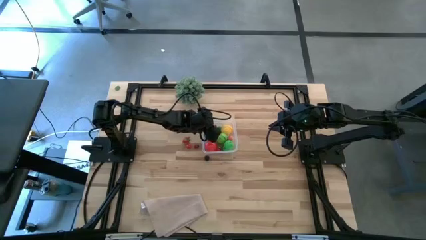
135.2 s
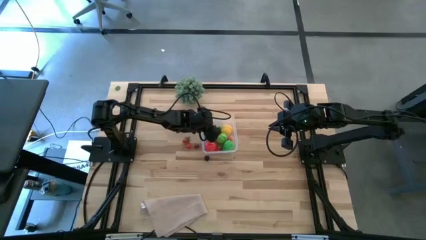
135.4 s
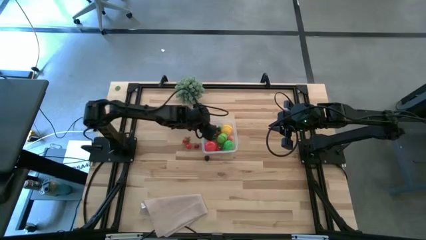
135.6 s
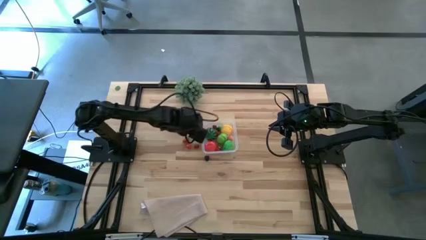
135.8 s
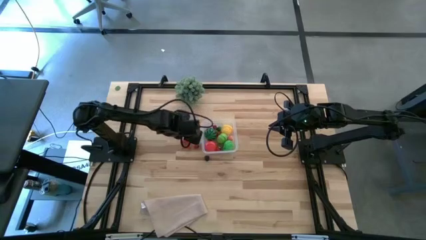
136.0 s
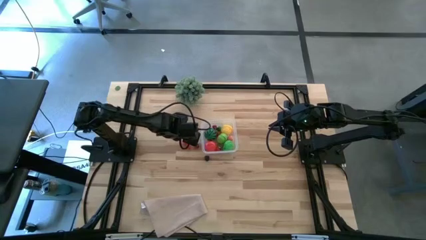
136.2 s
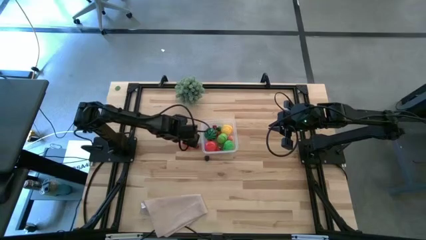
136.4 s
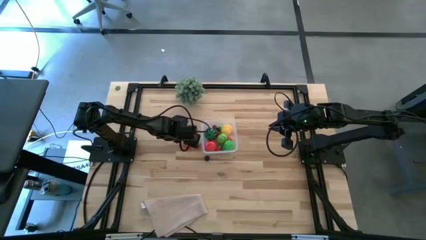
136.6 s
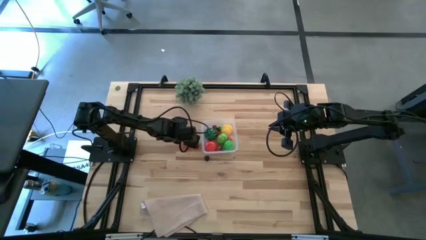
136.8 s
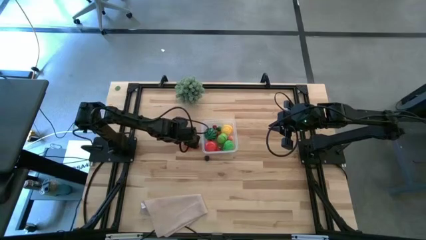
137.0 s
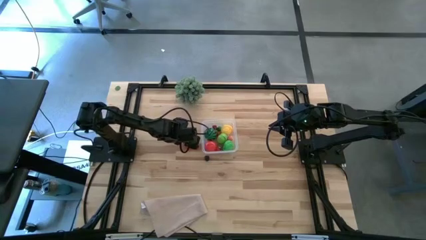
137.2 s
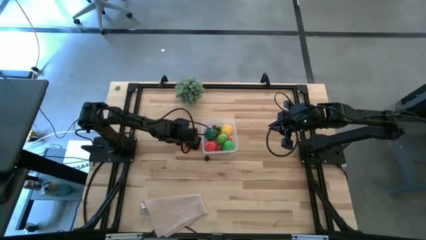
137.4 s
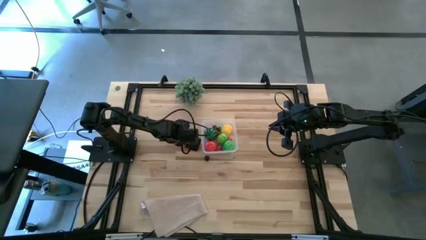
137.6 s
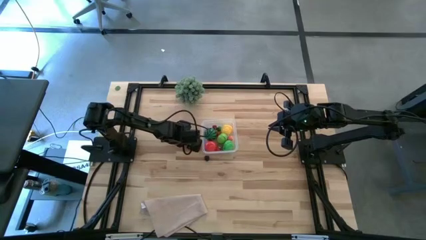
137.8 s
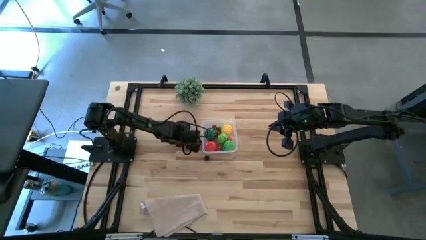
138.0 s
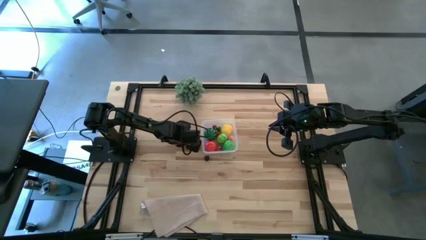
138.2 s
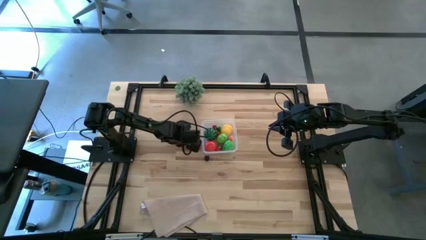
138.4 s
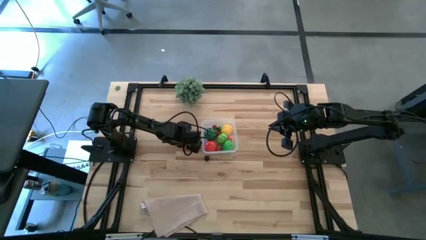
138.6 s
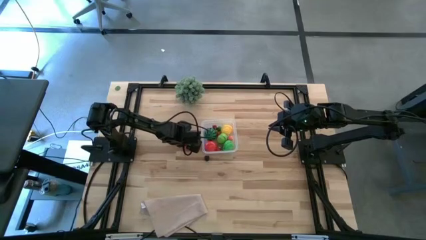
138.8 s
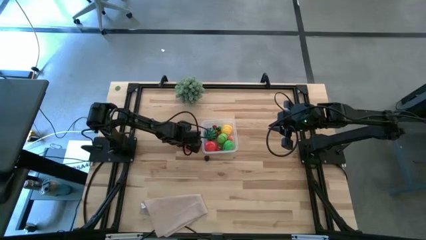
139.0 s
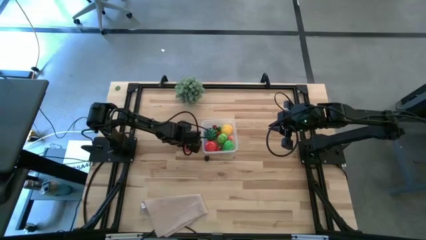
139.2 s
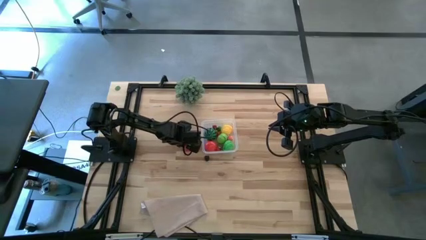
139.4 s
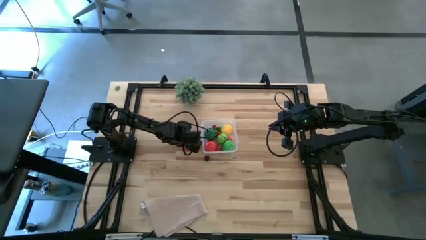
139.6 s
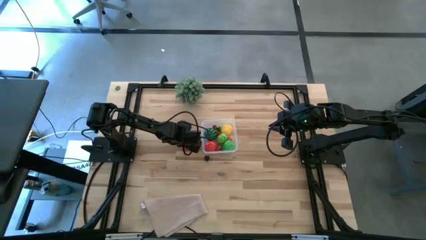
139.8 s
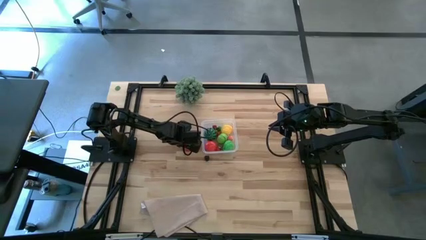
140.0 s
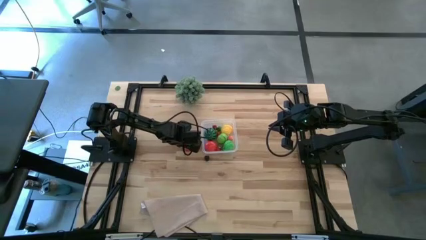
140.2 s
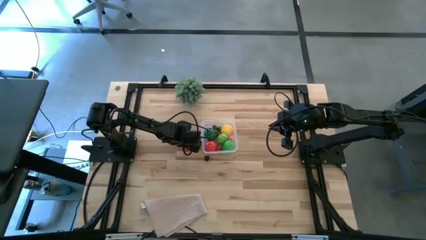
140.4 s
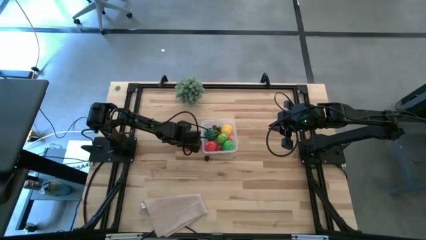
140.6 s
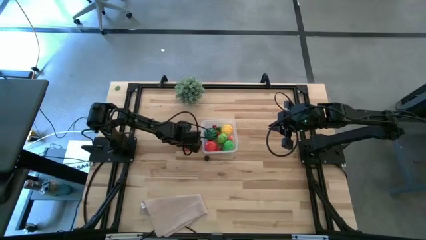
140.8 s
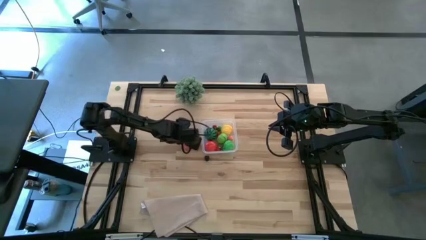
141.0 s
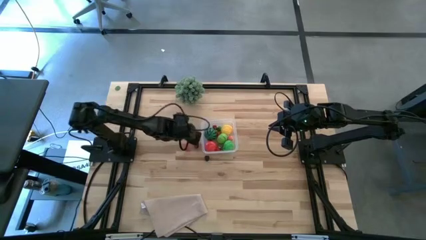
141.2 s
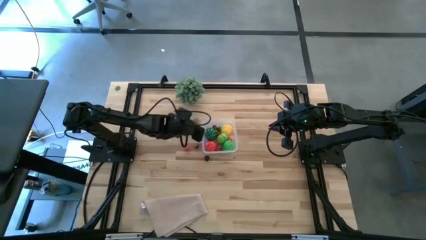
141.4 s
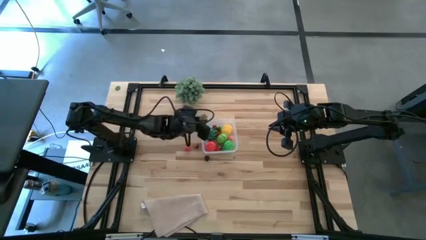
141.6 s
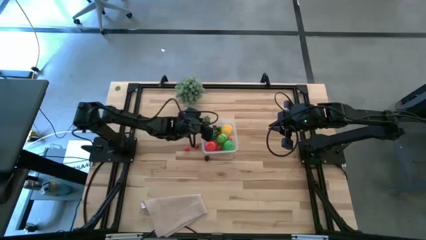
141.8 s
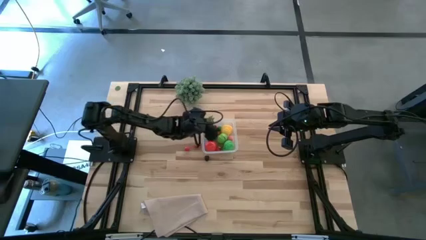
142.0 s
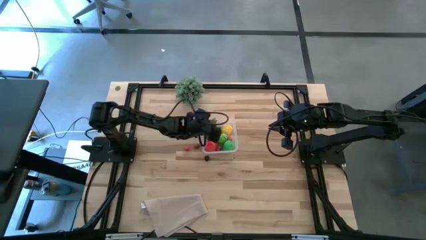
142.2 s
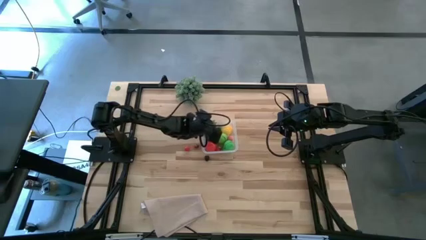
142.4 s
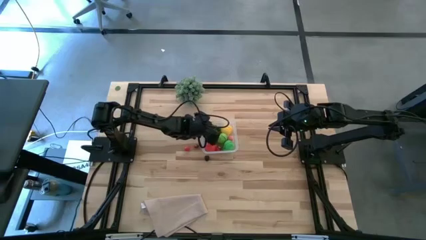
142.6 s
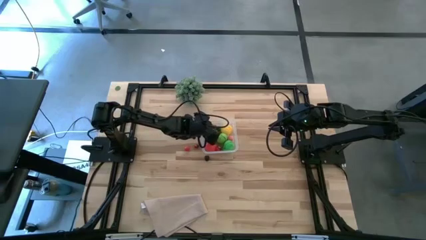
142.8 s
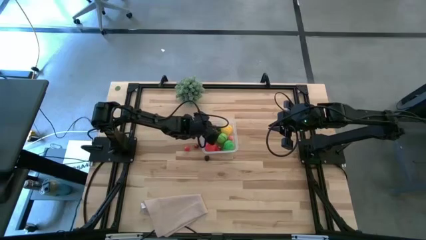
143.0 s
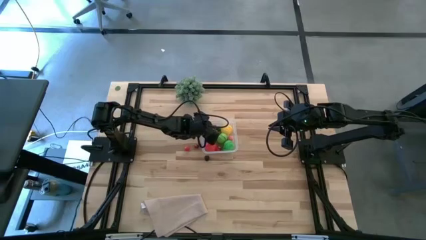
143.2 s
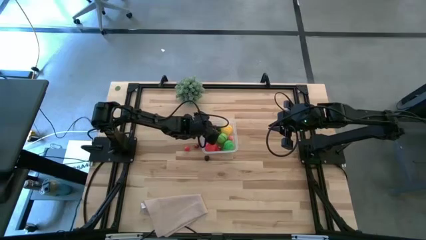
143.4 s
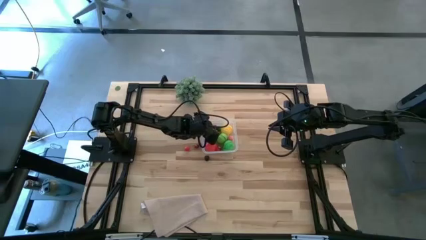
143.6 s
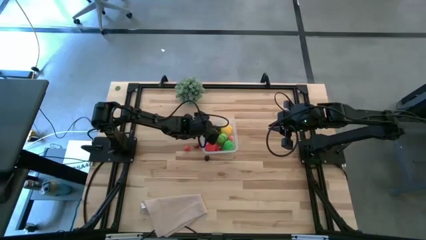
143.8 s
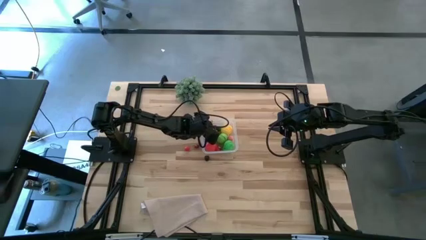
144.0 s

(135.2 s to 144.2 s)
Task: Pick and placing Produce into tupperware
Put the strawberry into the transparent bin

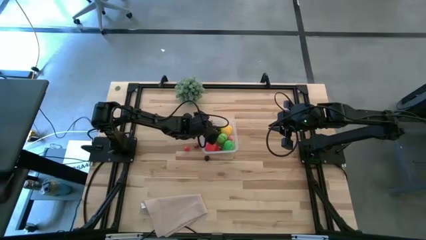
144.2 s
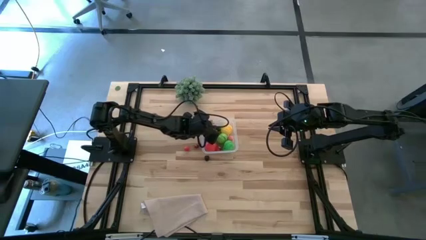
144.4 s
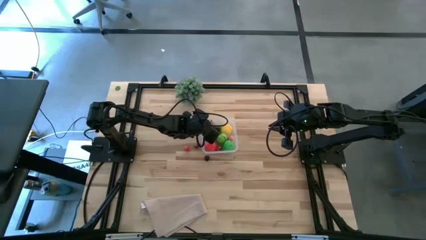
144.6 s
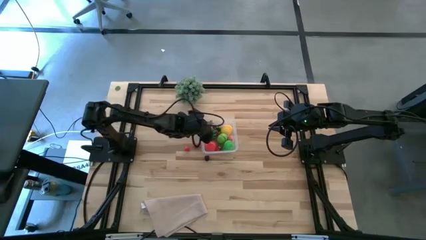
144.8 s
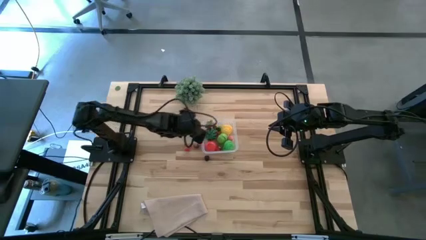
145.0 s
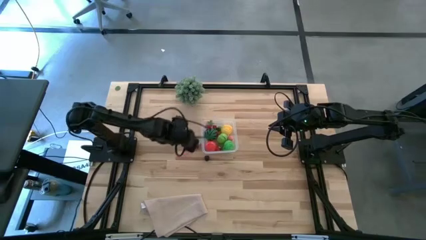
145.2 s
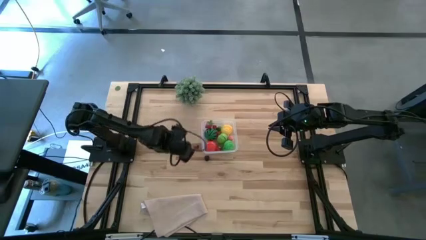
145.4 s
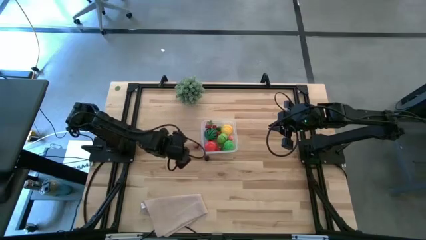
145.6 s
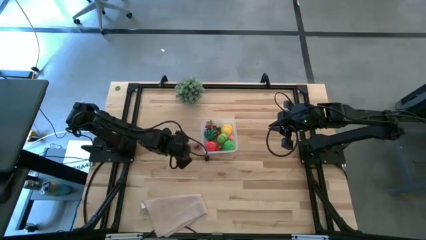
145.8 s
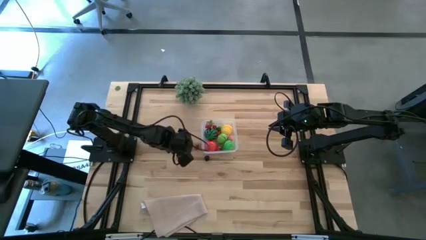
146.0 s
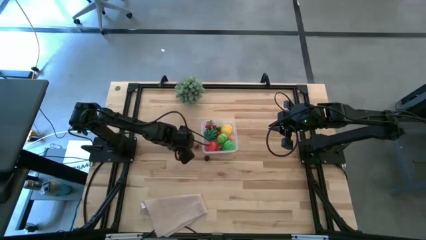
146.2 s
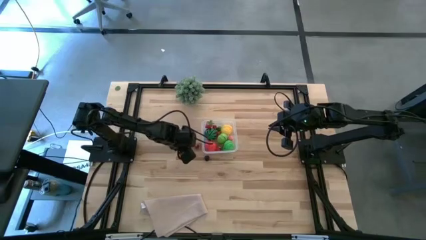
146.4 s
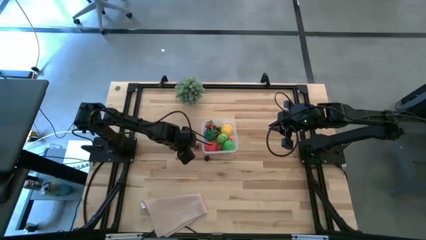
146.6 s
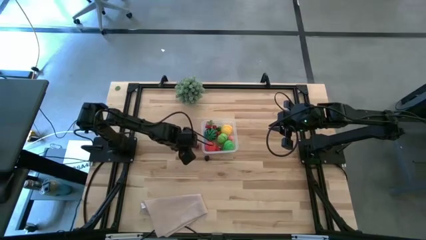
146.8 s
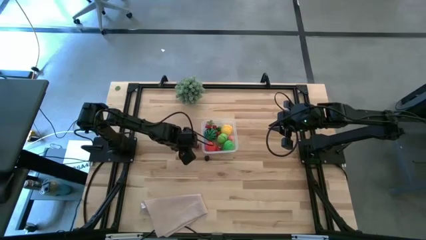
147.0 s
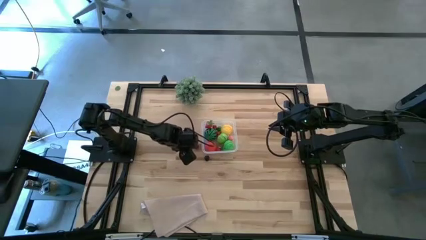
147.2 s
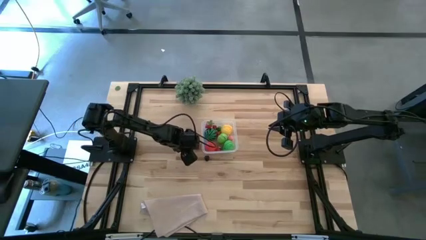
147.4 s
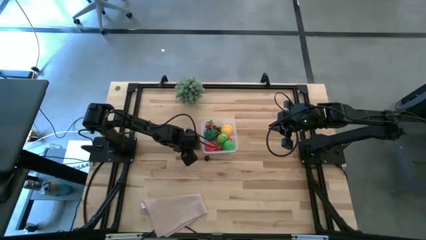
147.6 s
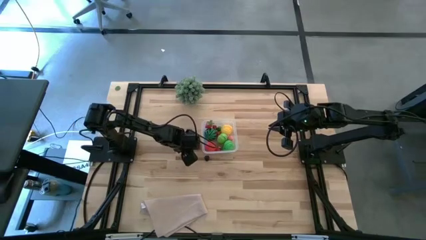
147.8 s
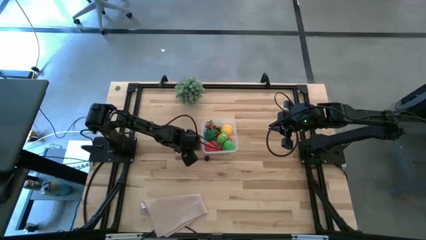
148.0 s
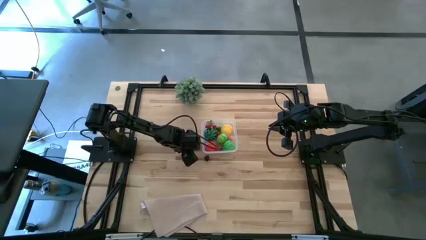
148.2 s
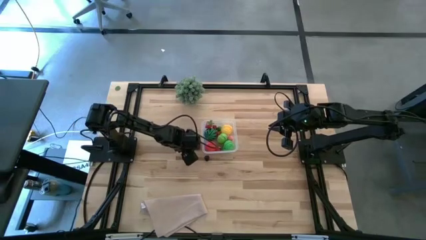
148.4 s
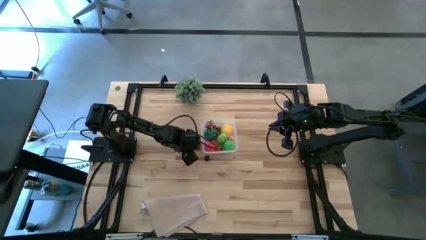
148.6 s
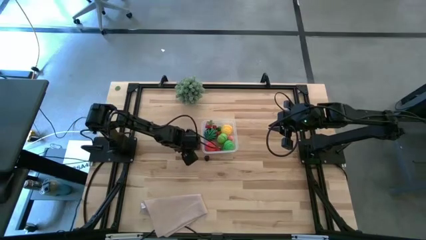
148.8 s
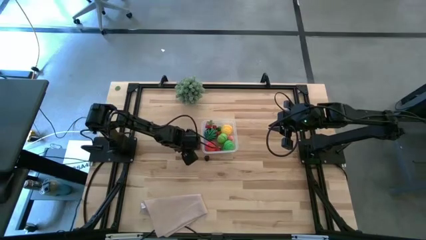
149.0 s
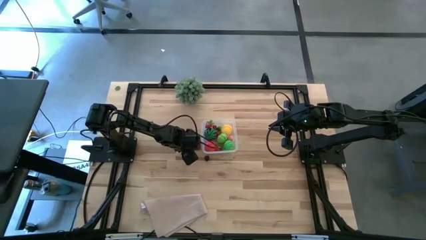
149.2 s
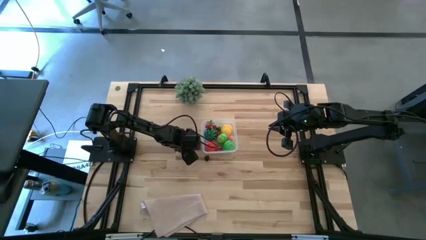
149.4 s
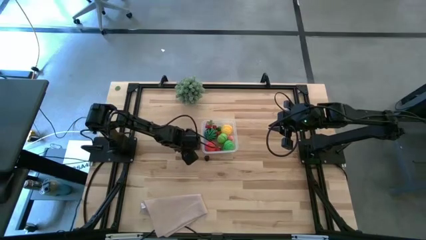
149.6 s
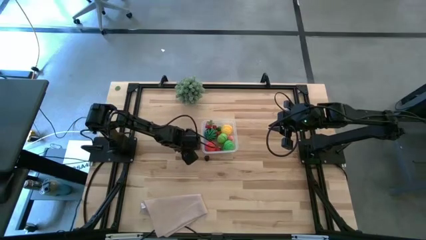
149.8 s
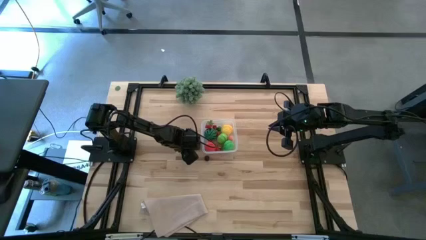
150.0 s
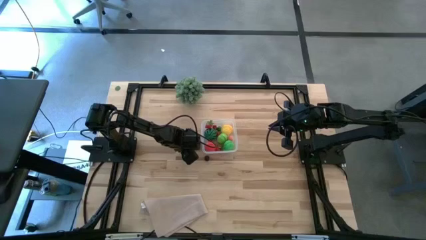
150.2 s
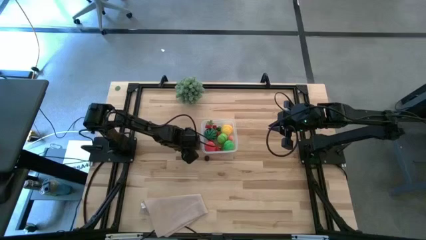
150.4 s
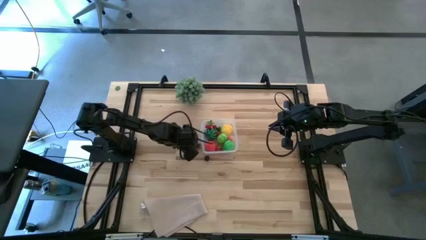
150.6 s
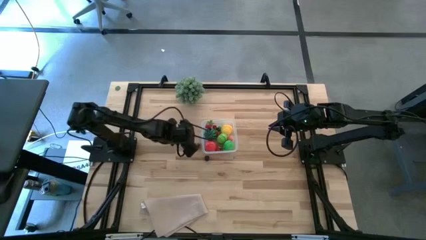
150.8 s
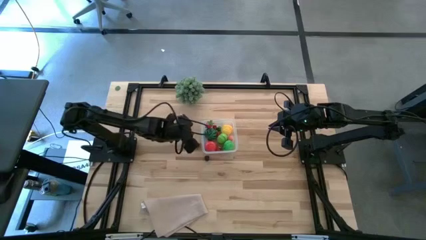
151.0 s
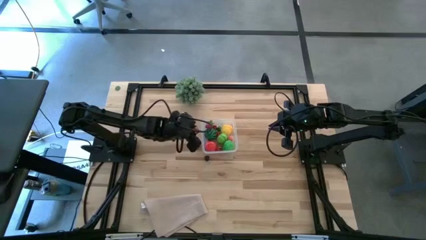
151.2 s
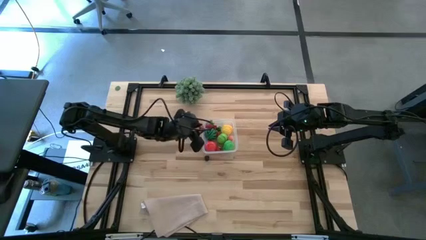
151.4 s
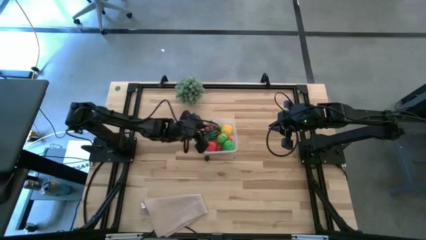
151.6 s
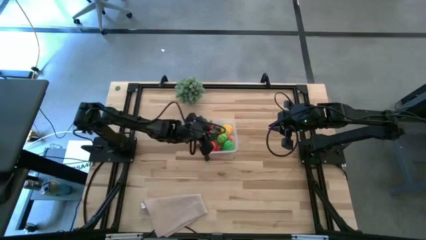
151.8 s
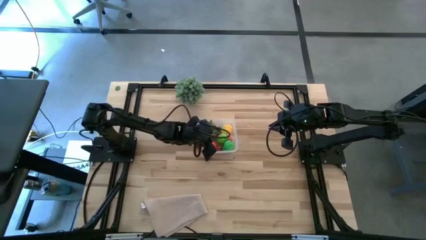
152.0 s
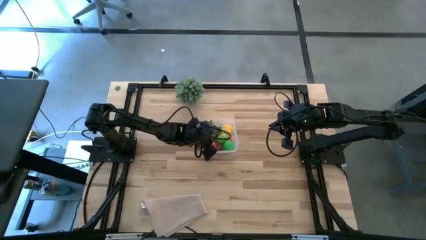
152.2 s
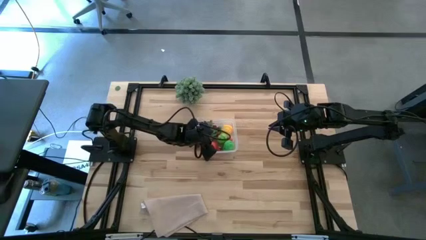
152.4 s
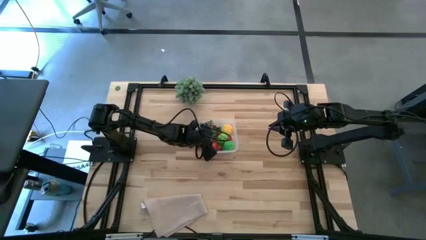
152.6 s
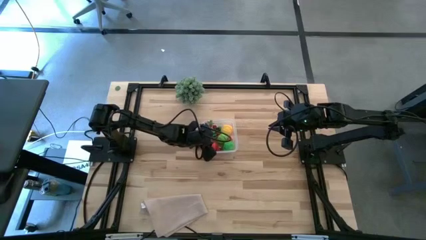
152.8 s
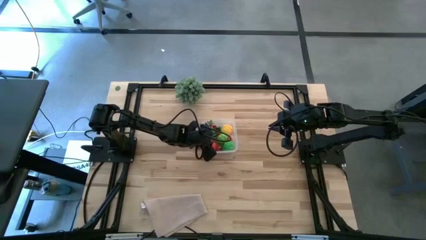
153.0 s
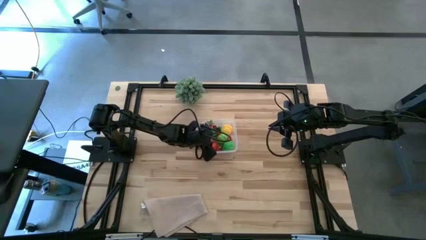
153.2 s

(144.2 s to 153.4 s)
Put the left red cherry into the transparent bin
